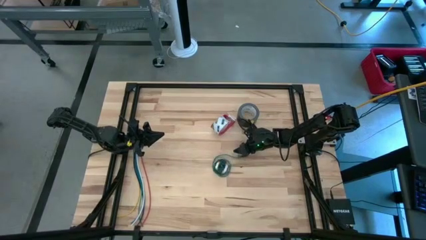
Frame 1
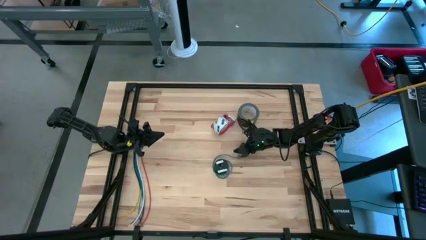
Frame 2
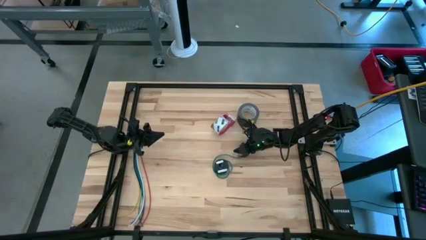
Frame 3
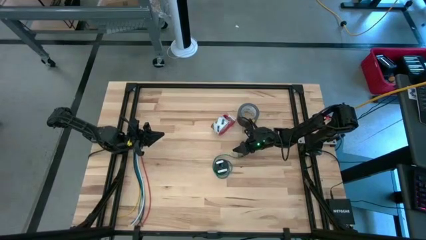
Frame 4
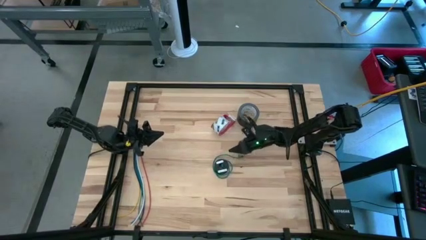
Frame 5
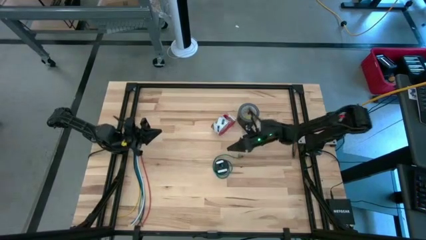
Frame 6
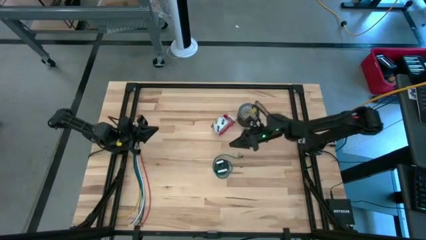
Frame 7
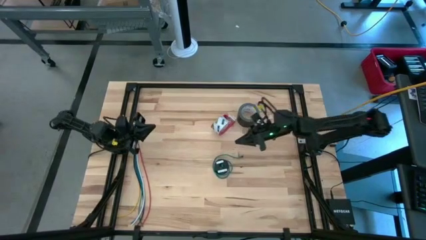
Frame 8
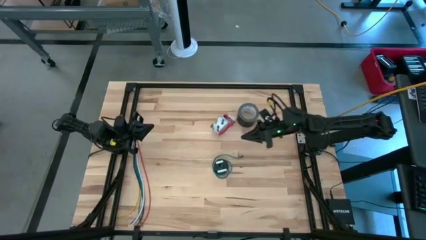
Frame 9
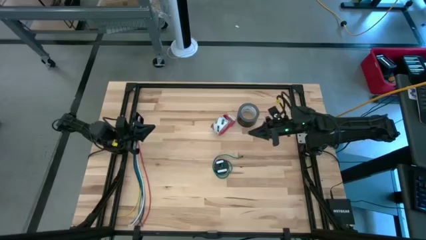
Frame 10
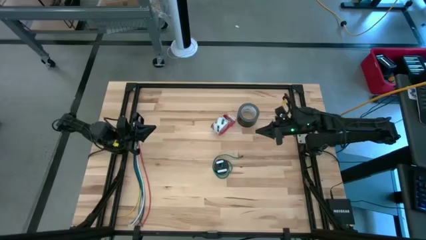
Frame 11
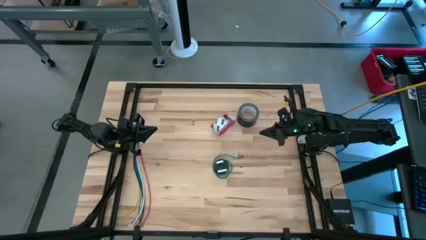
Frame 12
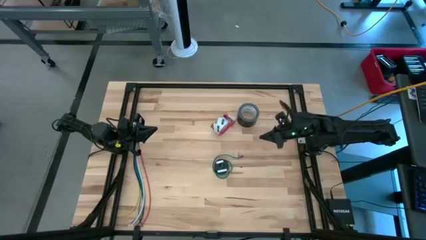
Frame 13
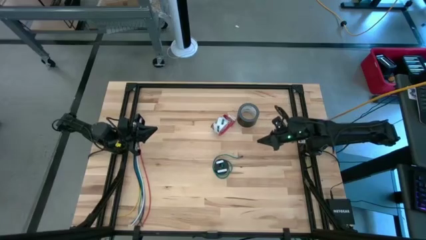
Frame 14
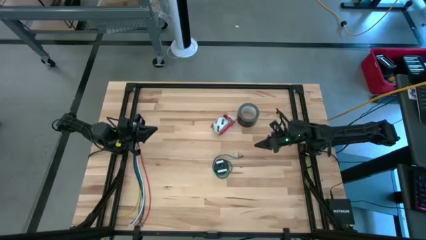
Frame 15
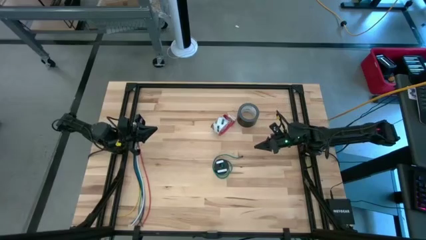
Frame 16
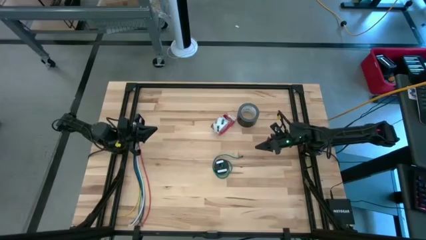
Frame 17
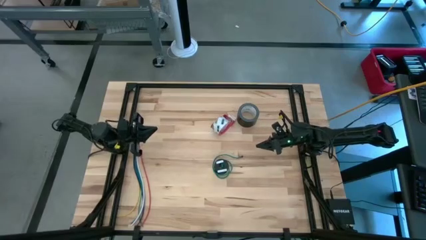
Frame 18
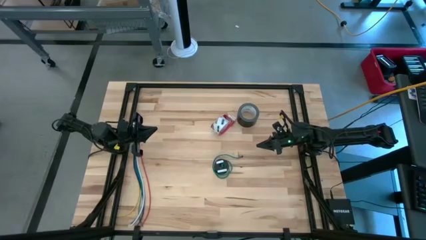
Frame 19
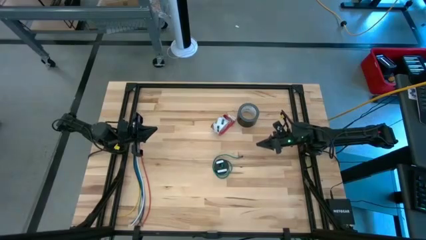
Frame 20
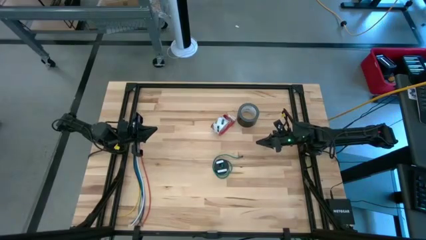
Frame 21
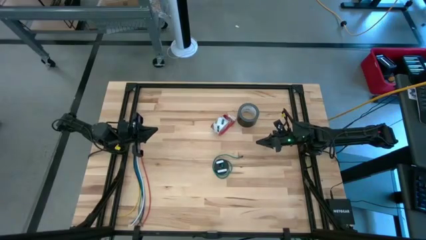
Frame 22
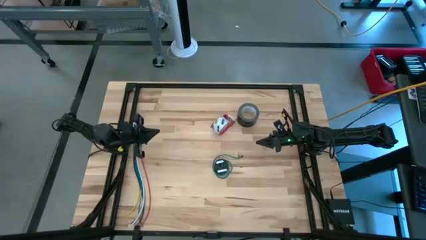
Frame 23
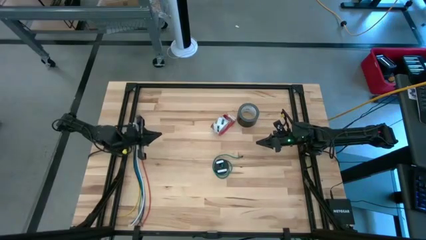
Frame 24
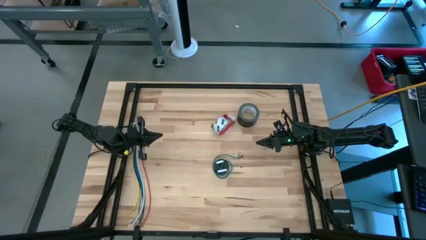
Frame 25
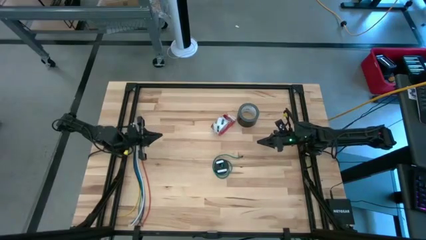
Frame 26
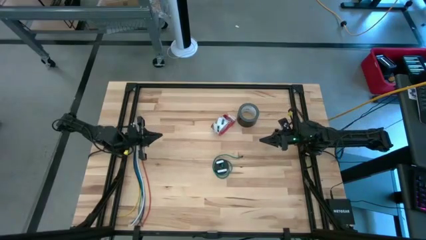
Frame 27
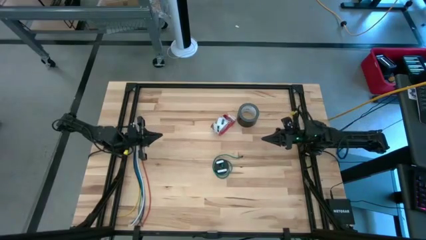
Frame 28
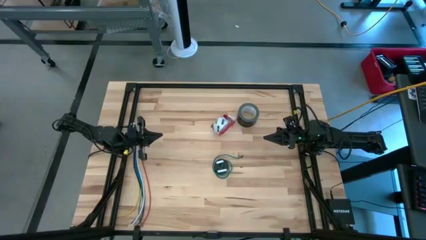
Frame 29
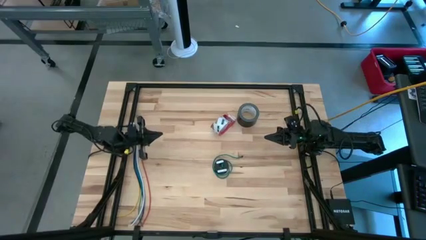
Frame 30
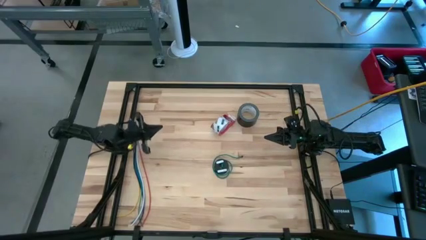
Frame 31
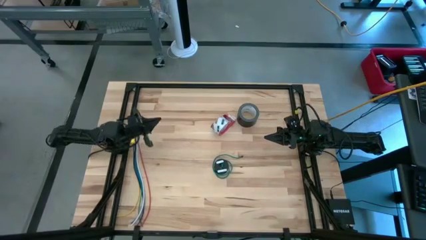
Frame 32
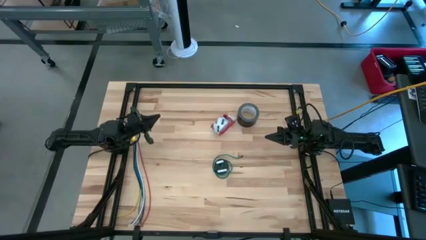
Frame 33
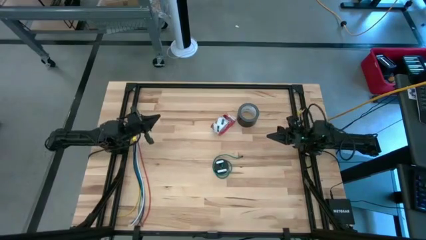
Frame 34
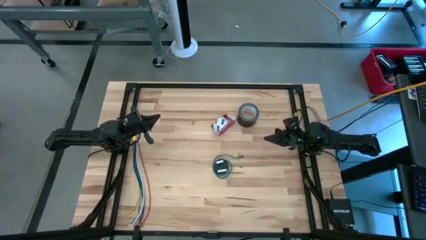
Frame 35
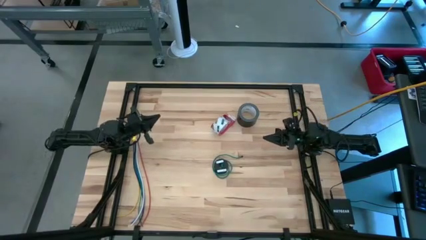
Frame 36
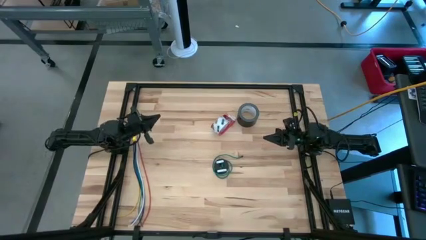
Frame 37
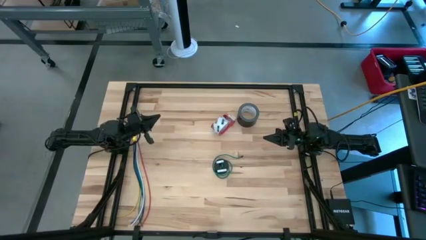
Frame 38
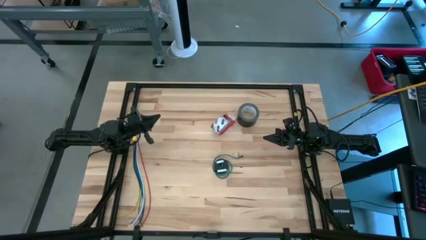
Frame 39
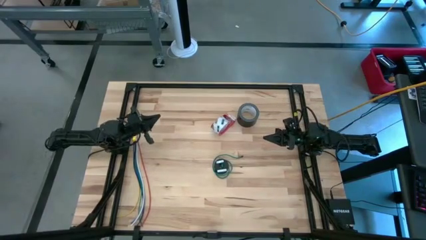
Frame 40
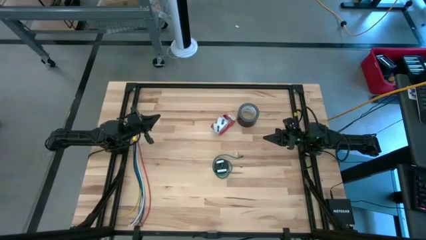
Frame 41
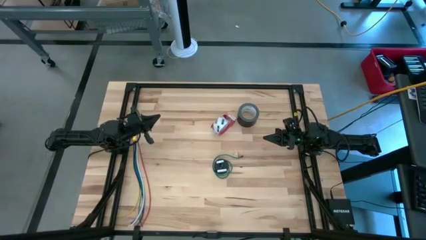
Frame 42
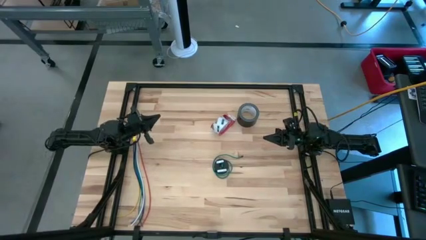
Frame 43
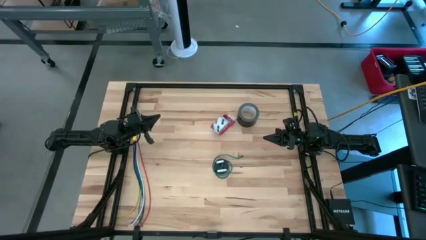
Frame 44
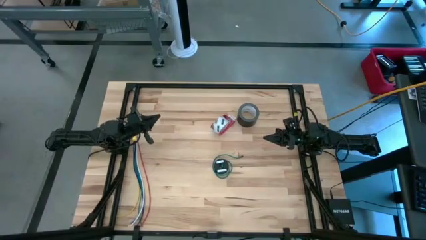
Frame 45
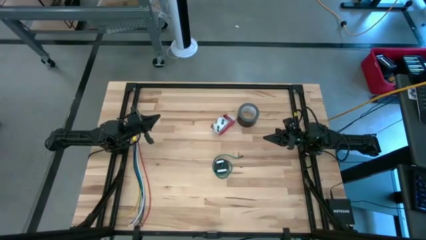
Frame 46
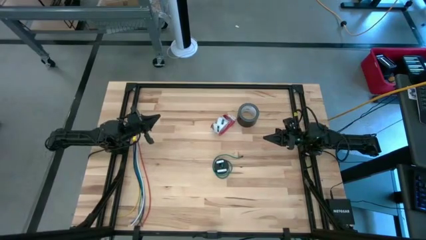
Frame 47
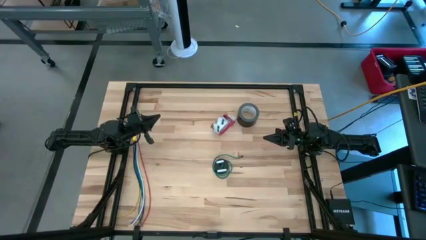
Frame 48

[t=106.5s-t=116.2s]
Task: Coil cords
Return to Home Position

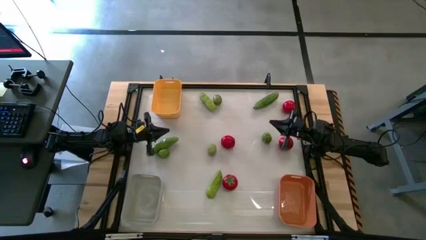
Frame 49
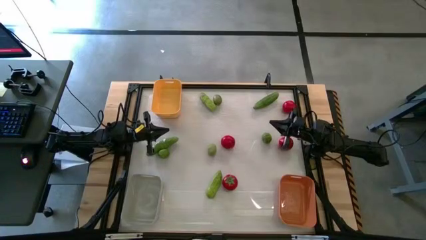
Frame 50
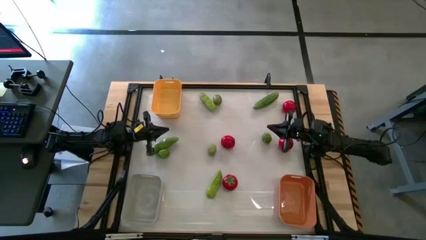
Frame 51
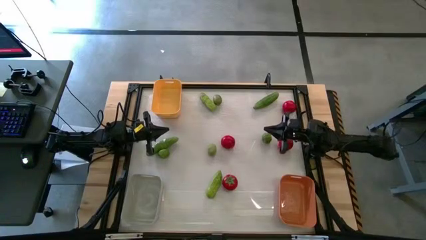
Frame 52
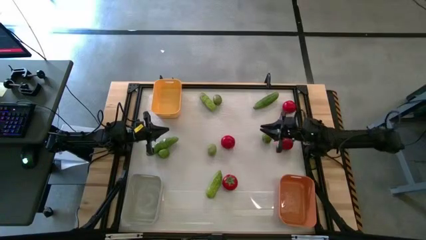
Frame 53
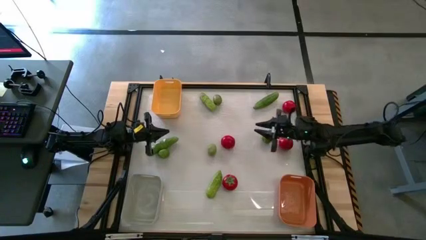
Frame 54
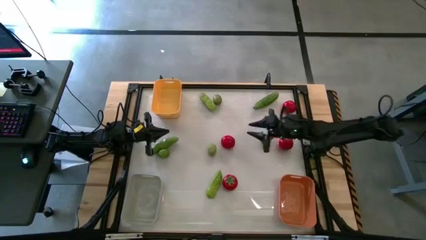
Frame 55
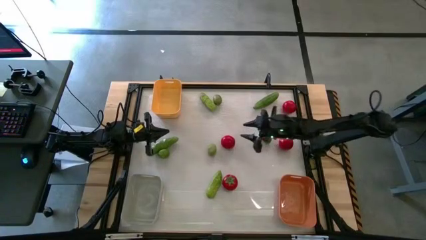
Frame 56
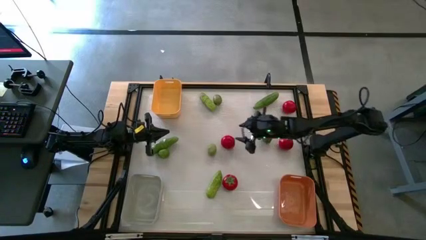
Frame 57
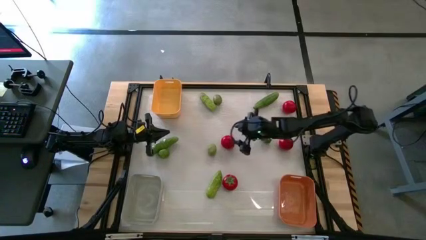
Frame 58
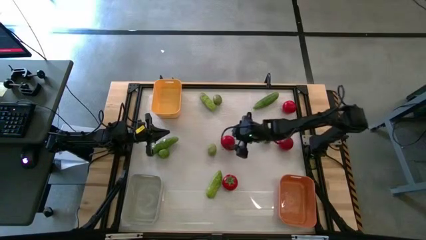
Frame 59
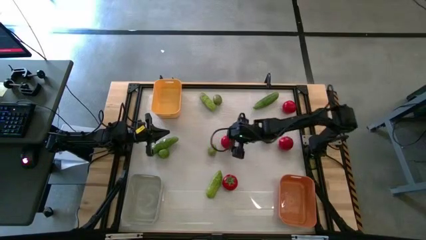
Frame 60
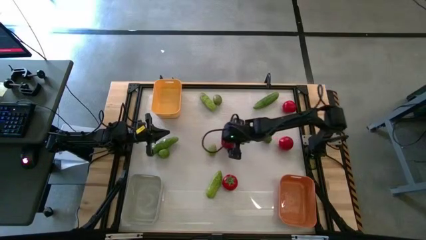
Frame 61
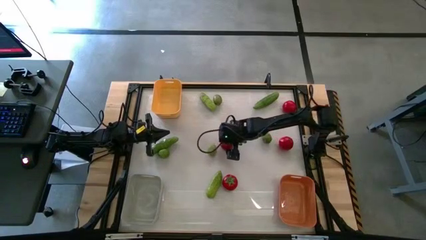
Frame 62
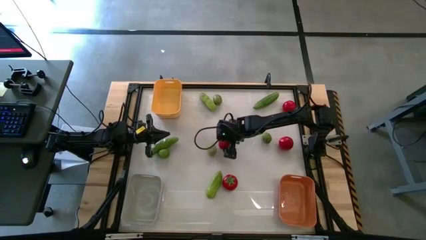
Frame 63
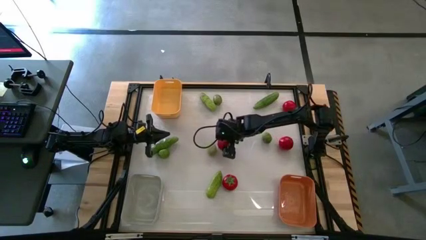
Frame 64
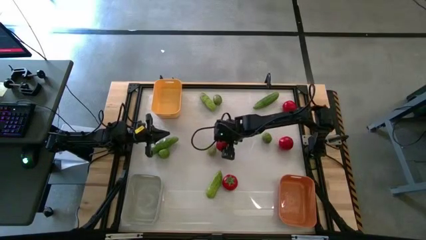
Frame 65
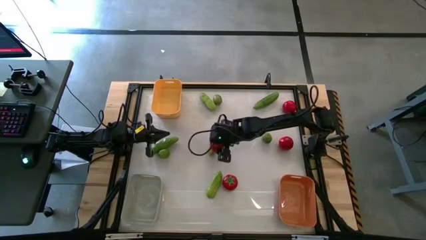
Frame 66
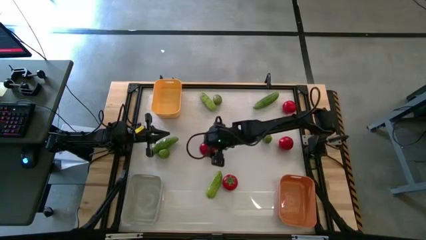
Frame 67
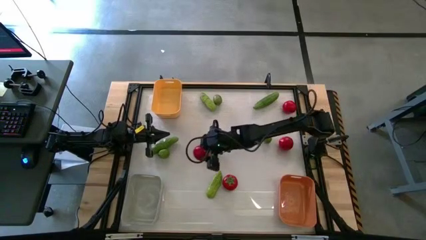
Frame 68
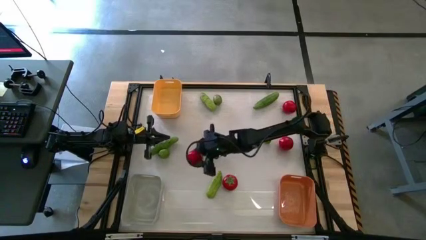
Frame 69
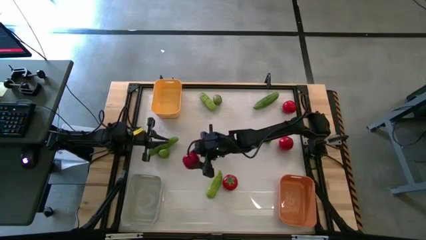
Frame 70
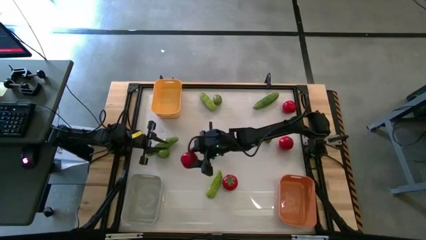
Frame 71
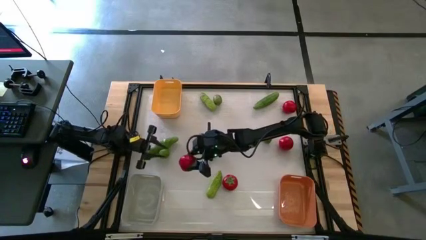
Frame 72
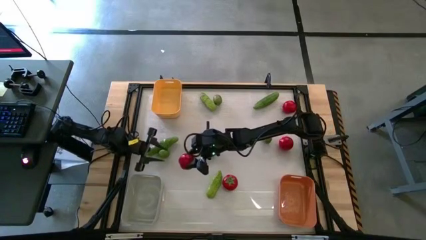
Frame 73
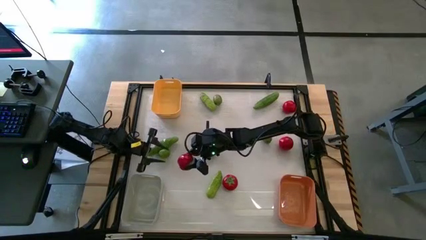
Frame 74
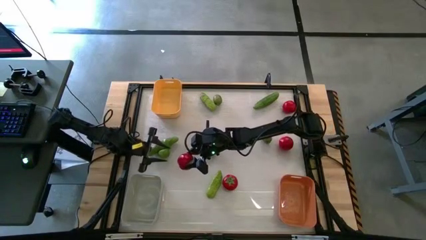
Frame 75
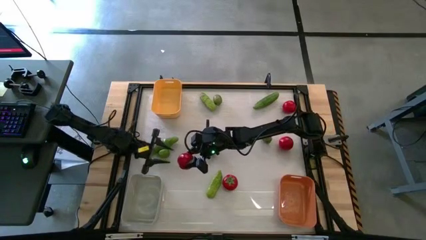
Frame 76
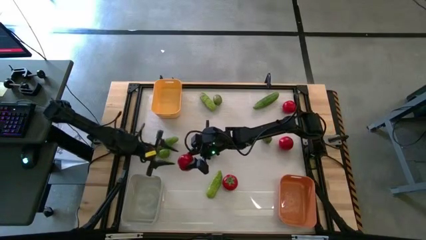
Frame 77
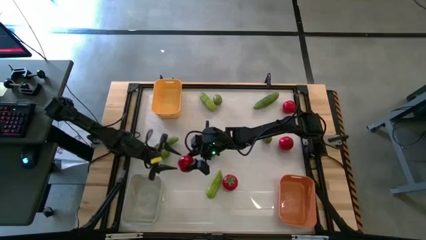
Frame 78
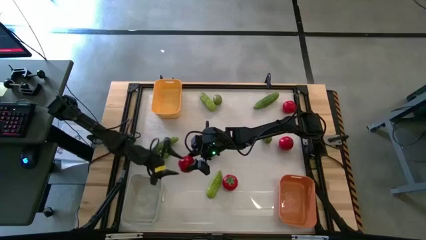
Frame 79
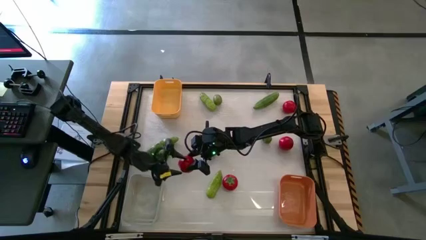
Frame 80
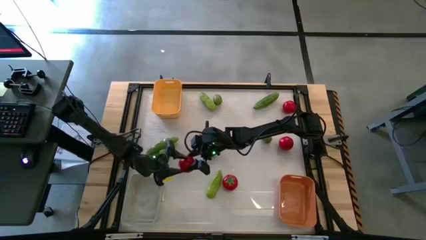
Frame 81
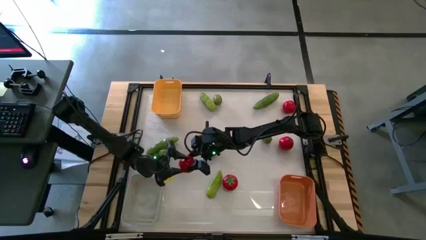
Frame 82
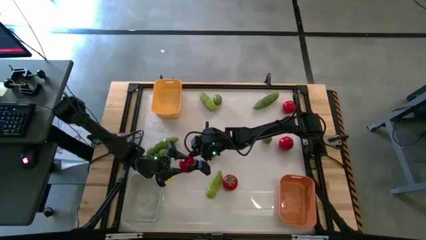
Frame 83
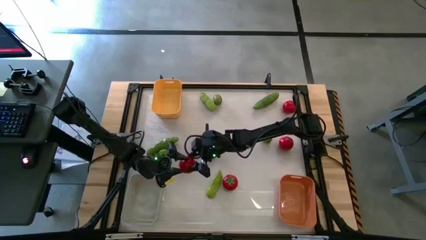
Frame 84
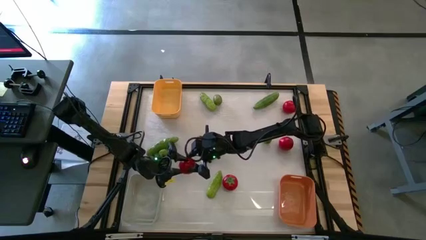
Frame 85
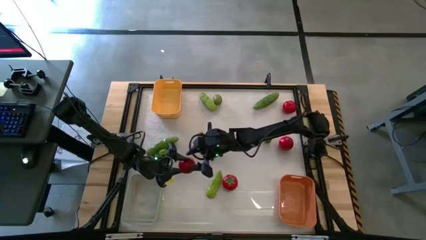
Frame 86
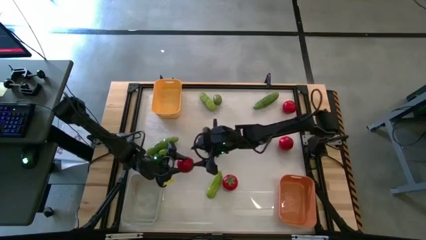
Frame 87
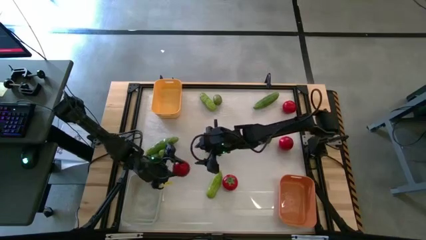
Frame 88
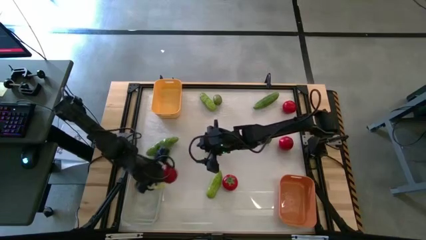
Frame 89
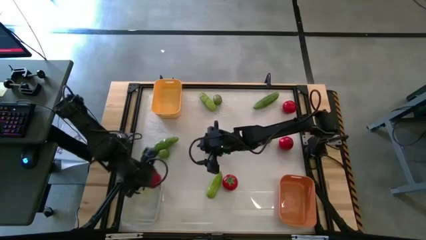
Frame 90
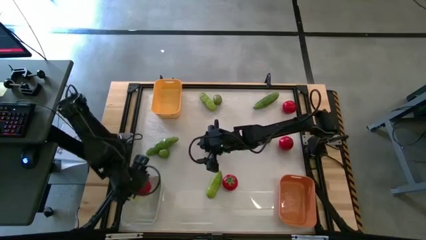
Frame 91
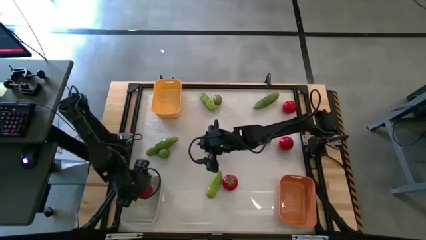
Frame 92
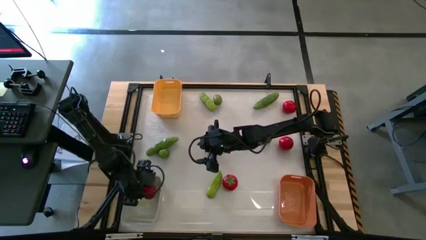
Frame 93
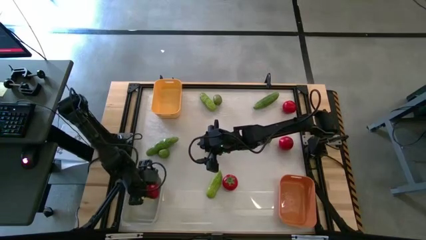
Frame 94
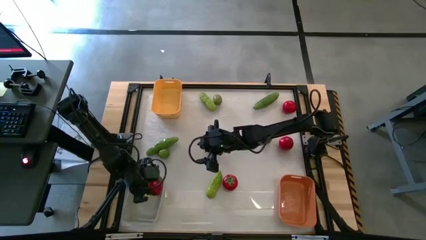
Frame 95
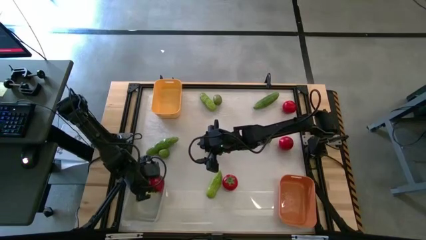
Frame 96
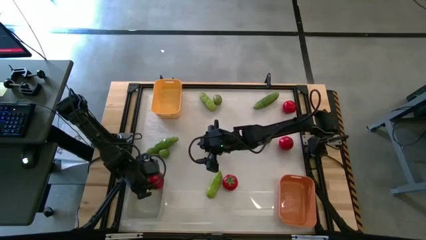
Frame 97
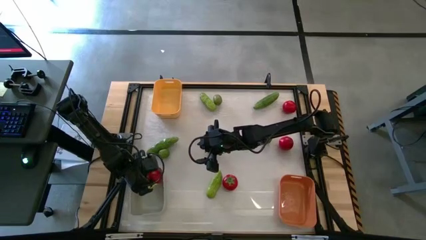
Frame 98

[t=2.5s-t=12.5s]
Task: Sort produce into baskets
Put the red tomato into the gray bin
